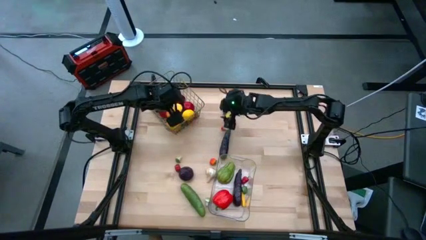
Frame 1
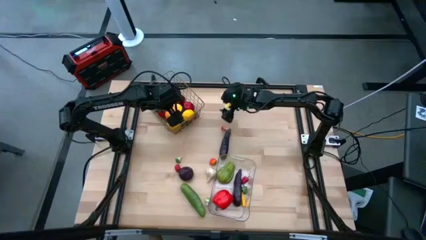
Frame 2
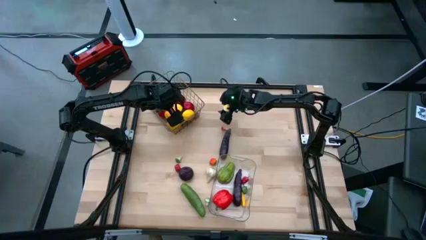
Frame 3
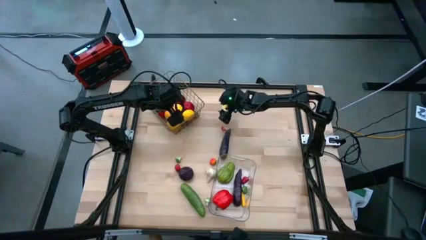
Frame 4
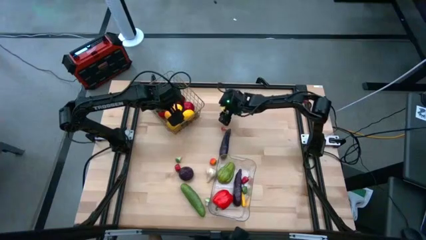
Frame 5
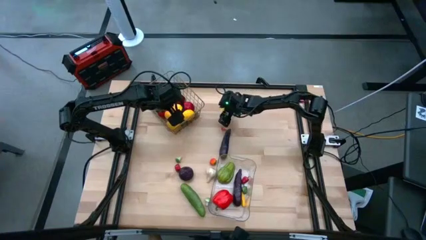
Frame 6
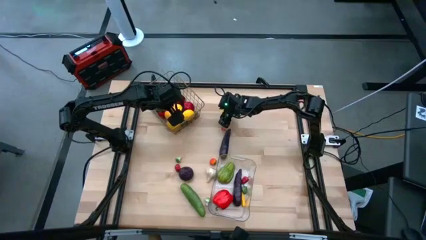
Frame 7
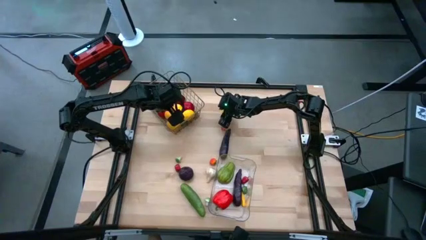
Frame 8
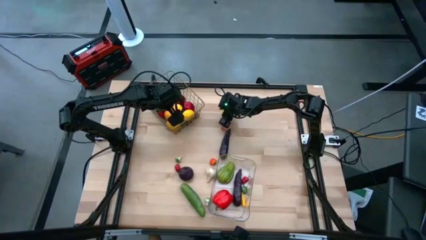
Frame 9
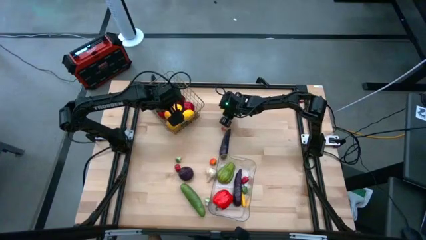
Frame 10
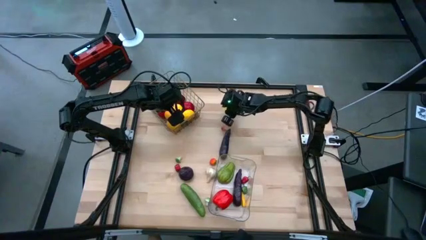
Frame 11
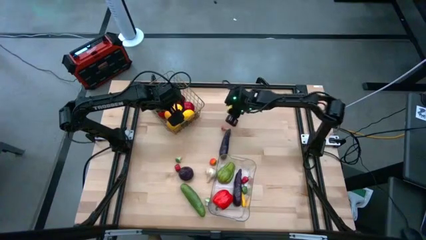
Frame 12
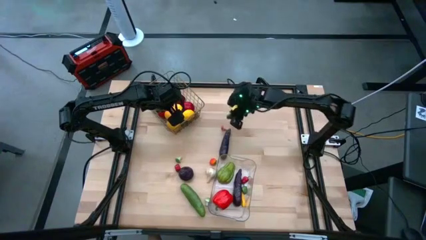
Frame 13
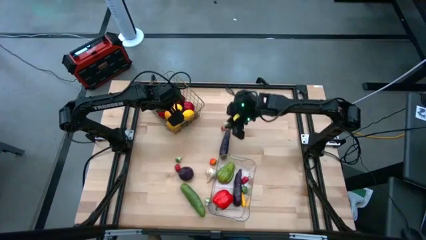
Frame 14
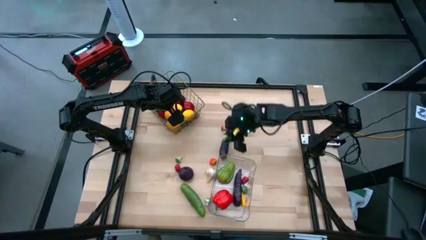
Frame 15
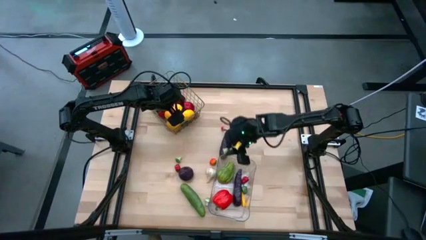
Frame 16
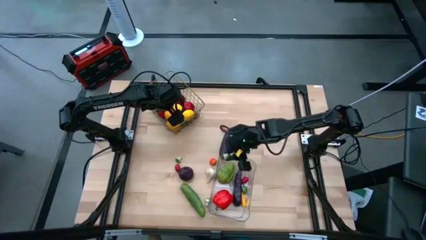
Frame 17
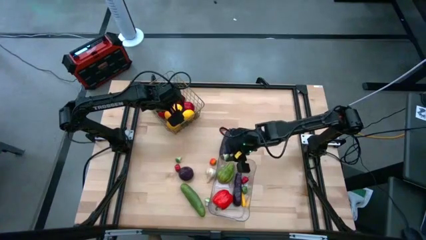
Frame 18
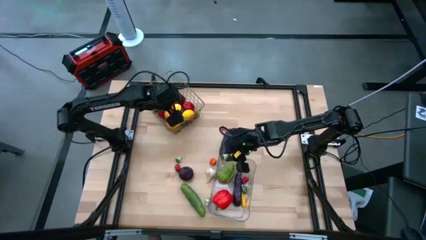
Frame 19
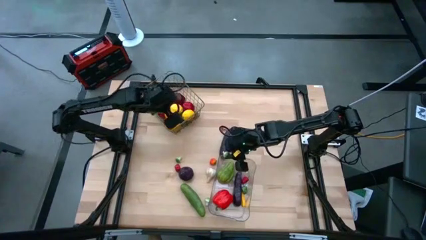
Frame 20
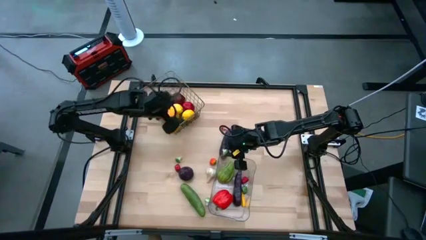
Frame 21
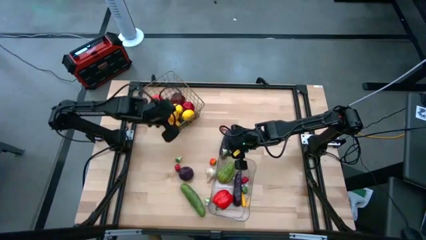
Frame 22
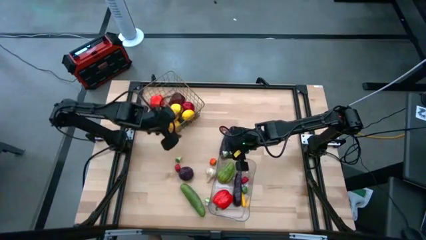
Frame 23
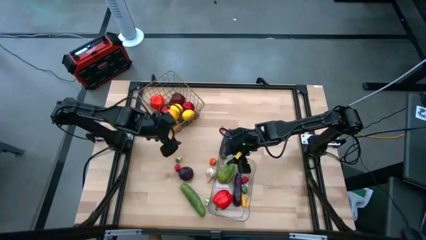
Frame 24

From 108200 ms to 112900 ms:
Task: Sort produce into baskets
Put the green mushroom into the transparent bin

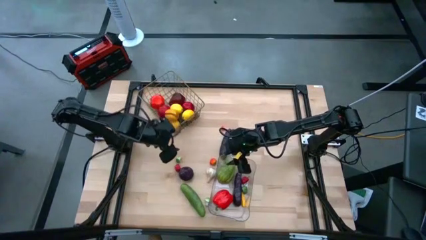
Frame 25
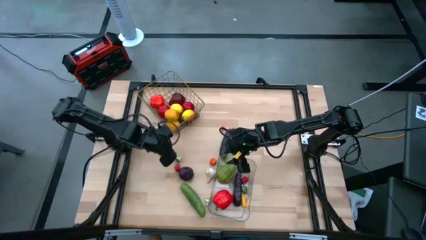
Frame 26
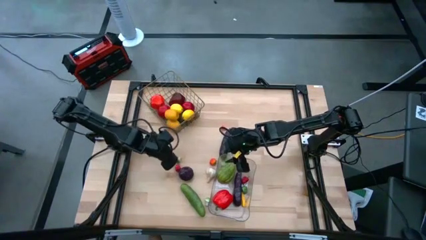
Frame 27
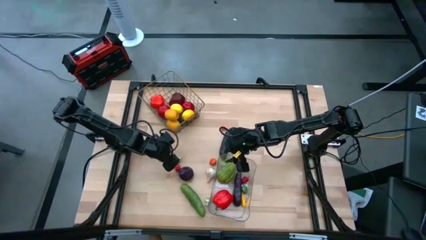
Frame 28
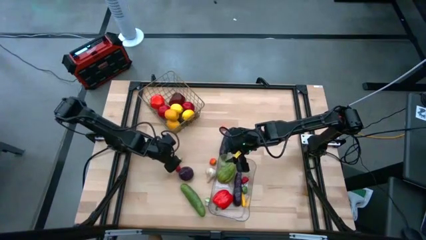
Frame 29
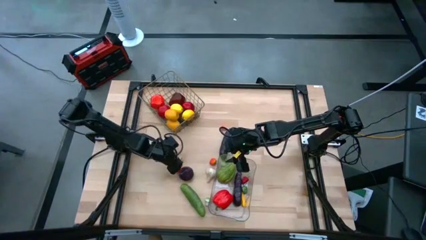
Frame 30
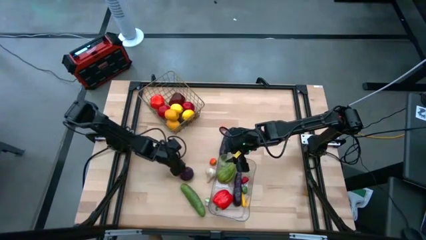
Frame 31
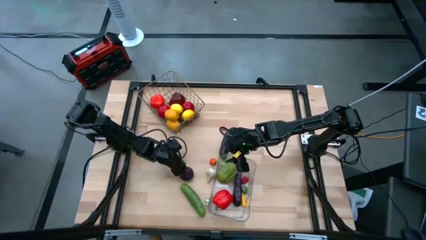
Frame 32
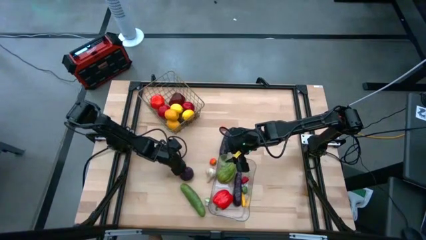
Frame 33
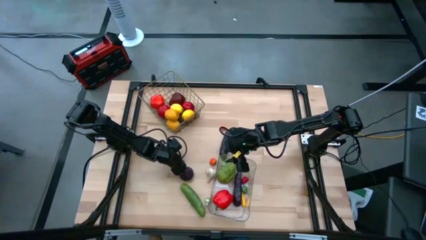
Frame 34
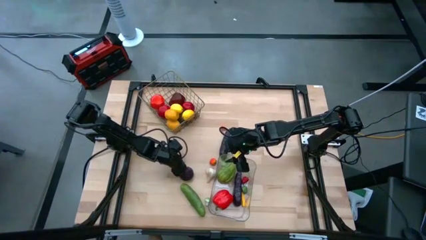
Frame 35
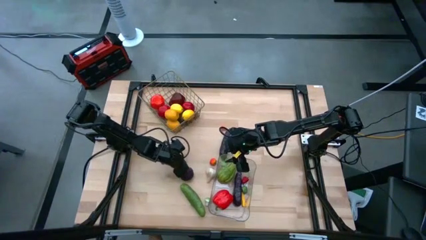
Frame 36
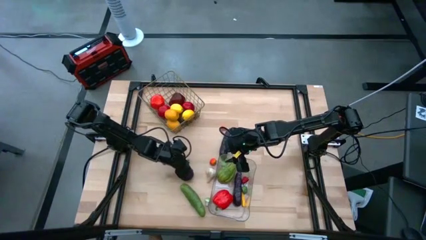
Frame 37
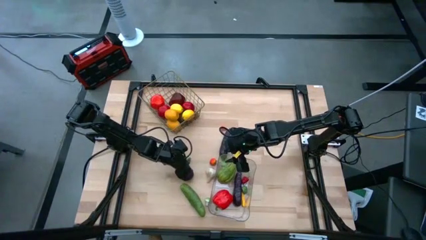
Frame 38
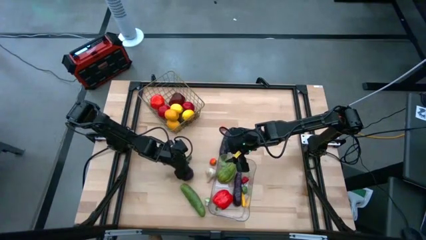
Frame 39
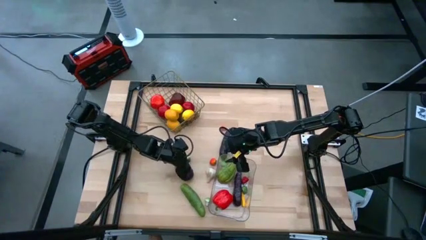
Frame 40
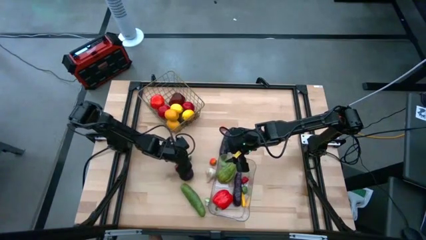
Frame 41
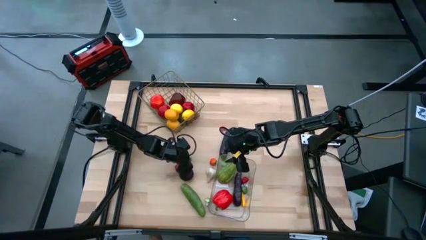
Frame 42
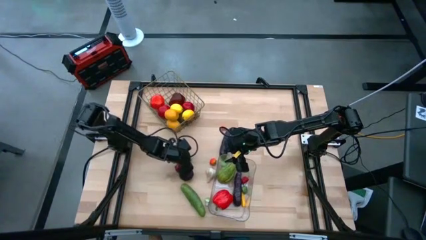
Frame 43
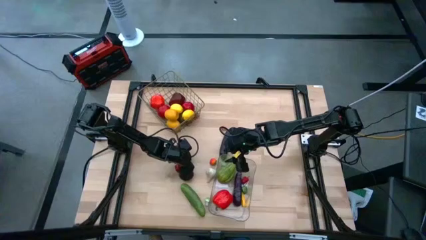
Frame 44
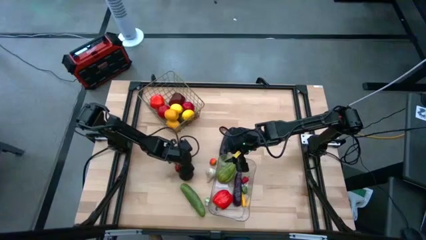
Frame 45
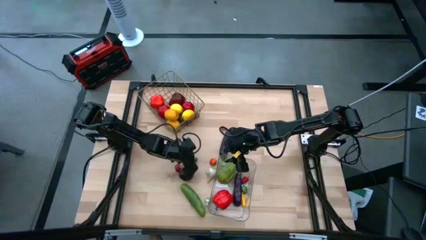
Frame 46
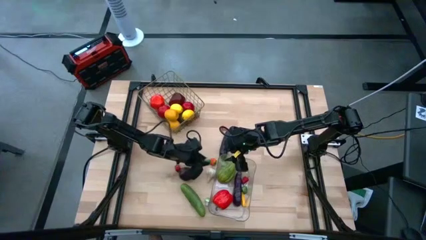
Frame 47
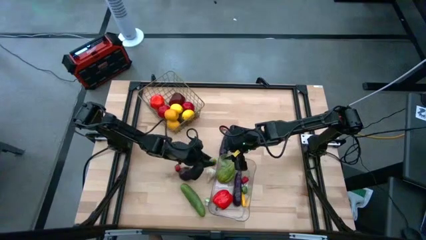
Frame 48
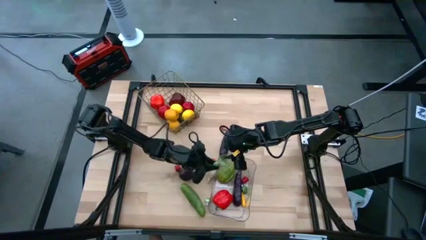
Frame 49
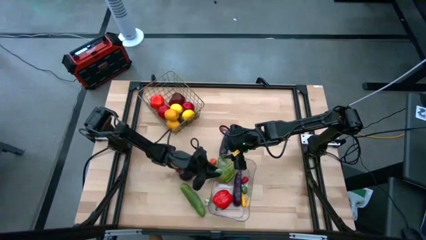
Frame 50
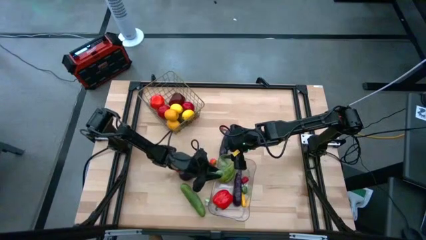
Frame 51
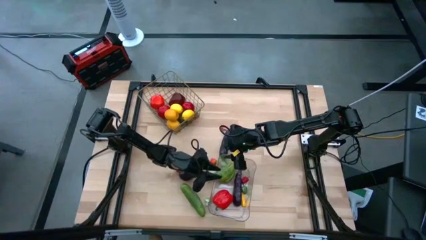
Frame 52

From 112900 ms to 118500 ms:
Put the green mushroom into the transparent bin

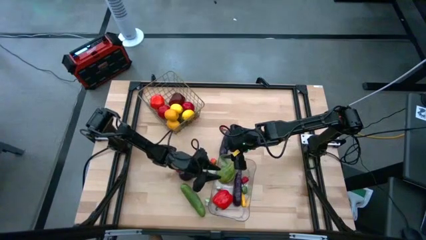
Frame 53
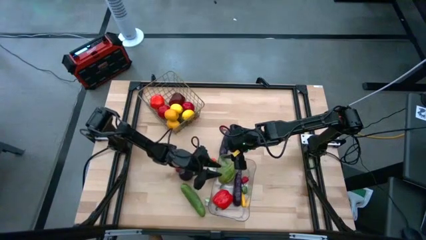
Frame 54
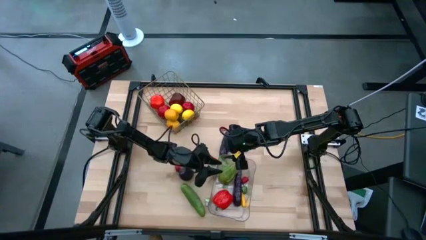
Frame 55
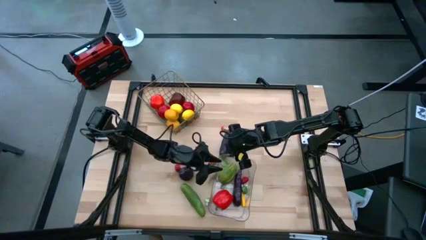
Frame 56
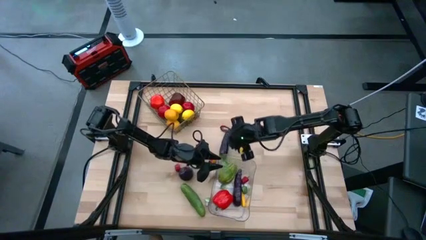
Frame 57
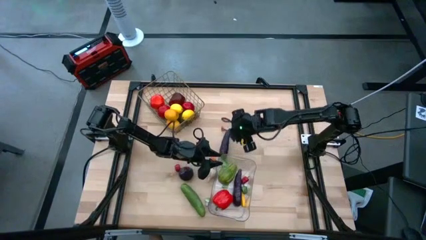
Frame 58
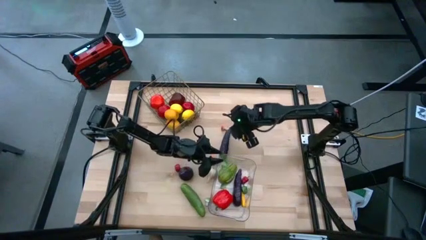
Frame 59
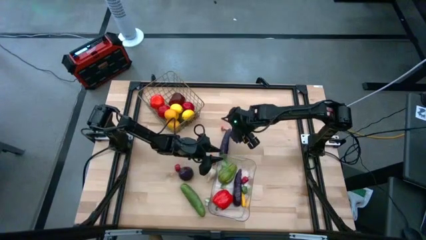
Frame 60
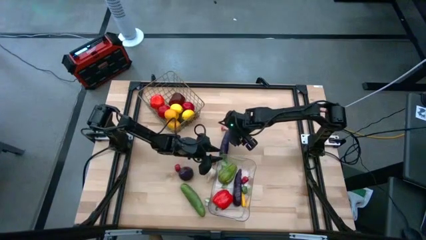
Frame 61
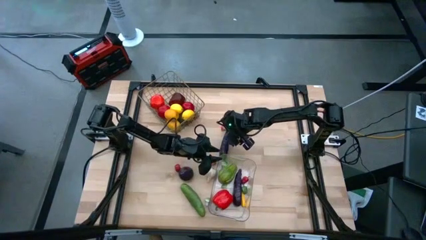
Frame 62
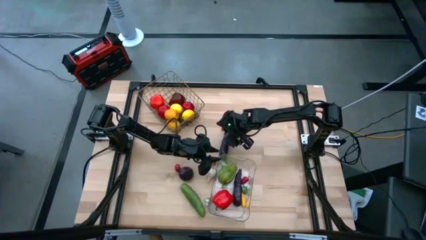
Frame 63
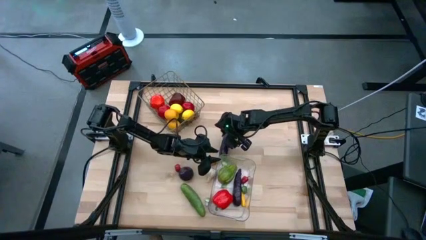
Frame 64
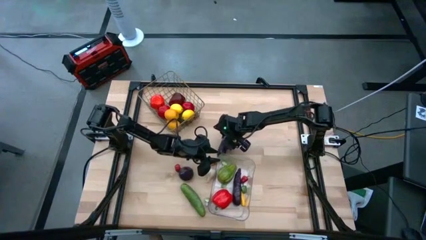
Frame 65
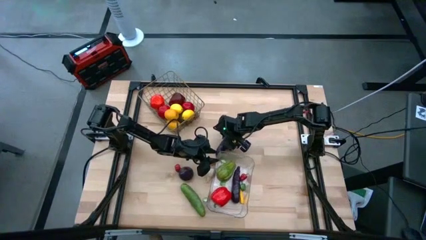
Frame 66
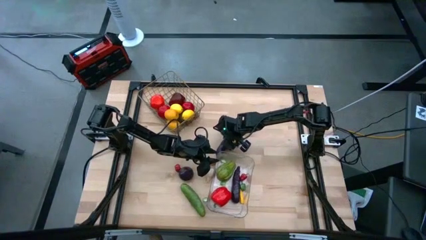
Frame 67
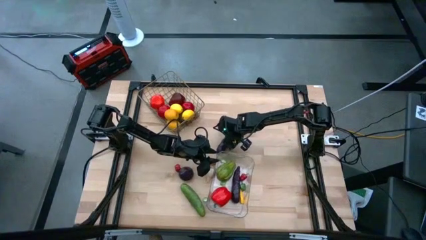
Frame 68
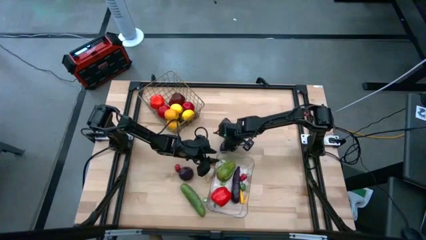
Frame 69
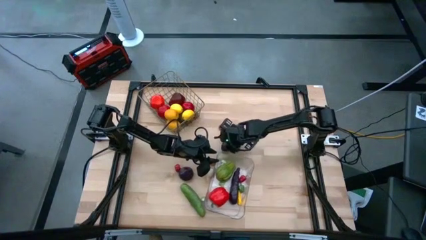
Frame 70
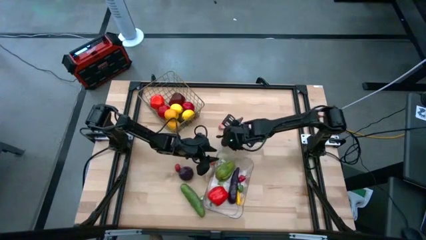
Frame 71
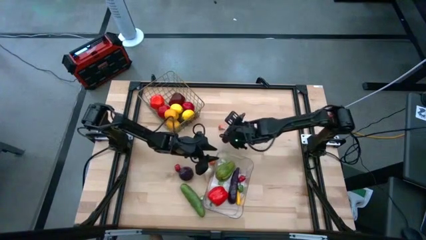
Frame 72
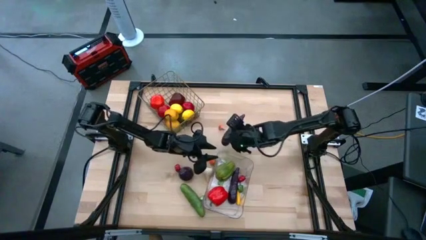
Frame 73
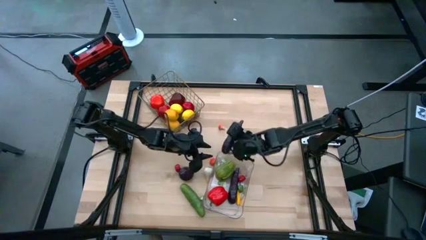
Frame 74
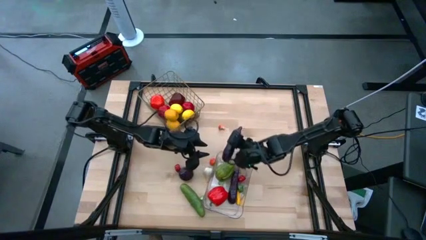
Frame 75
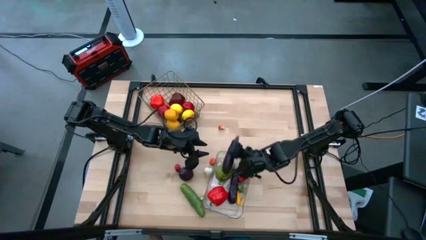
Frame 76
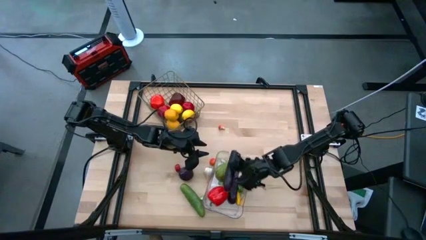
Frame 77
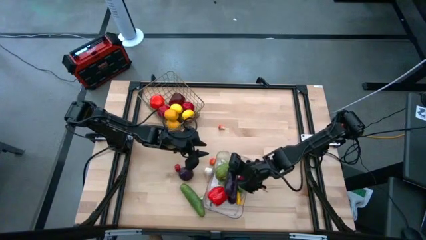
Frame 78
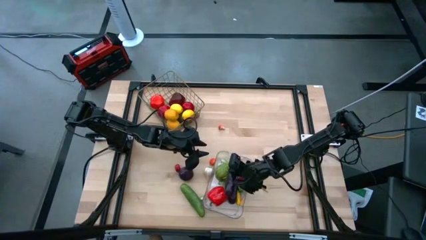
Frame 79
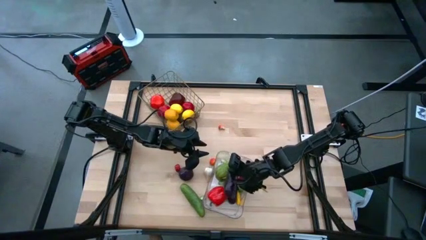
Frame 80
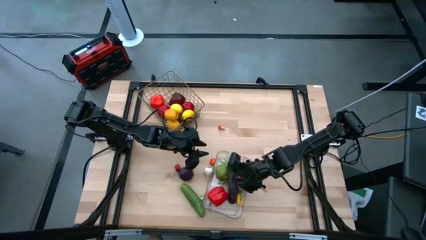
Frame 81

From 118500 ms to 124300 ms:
Put the violet eggplant into the transparent bin
